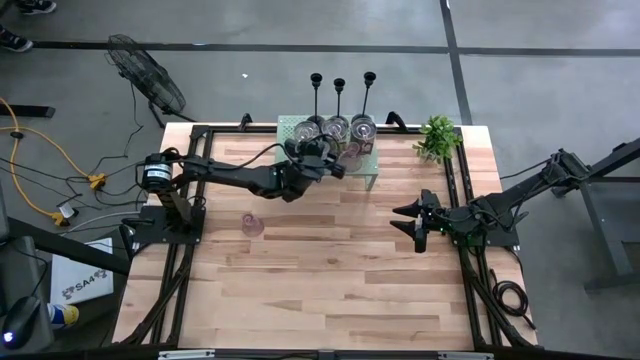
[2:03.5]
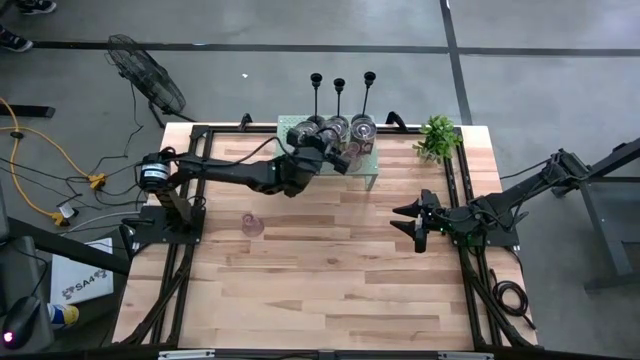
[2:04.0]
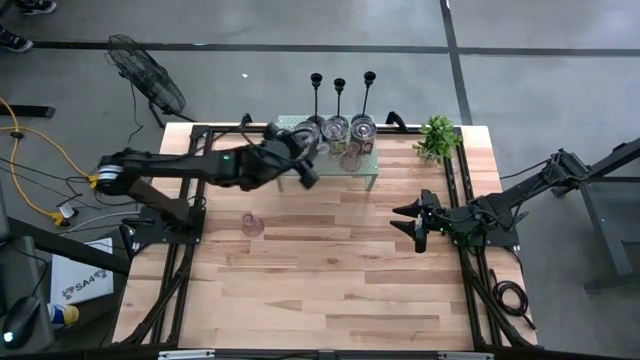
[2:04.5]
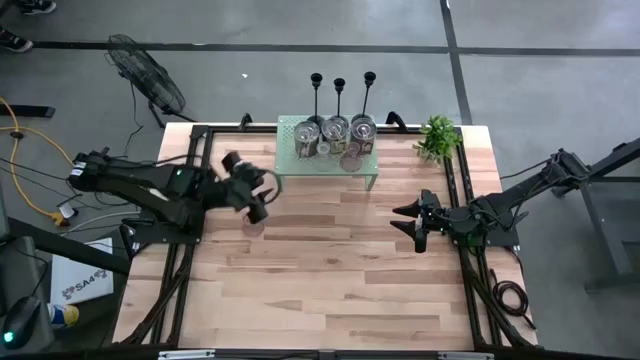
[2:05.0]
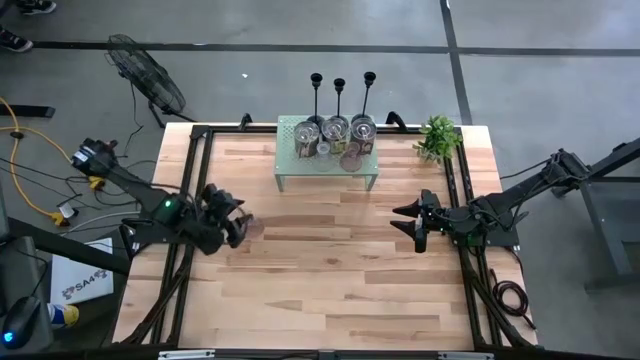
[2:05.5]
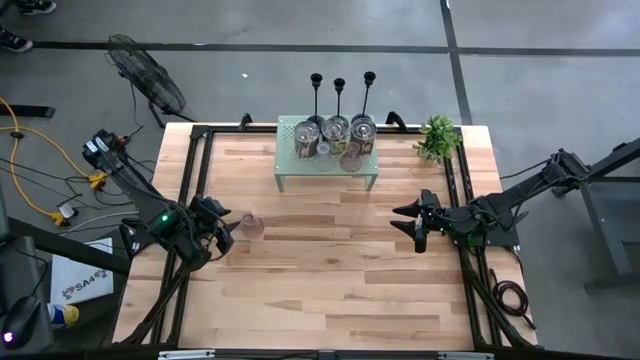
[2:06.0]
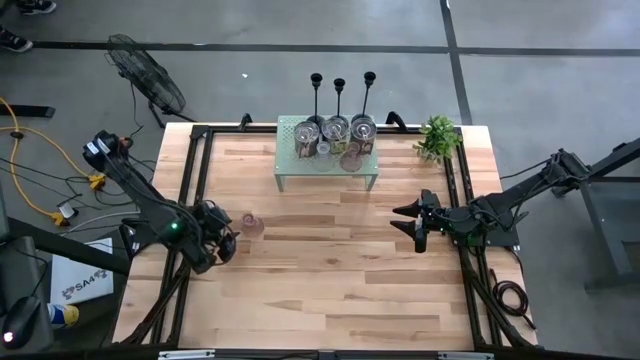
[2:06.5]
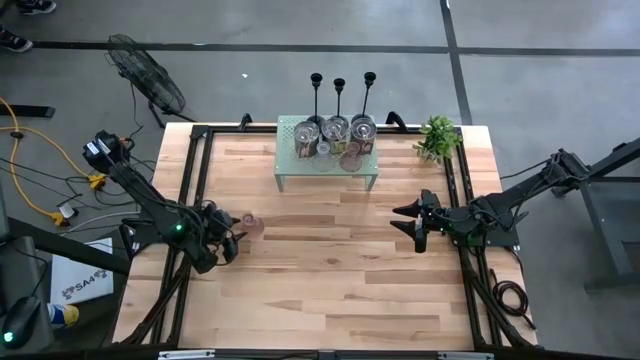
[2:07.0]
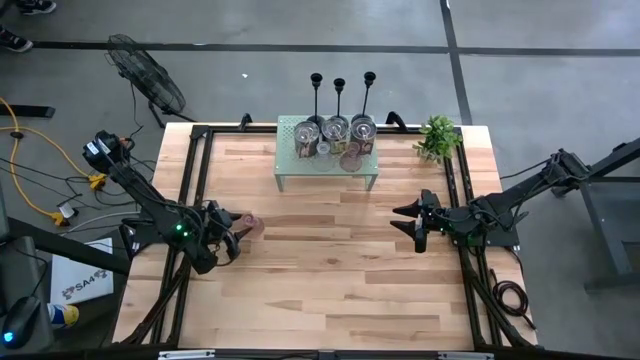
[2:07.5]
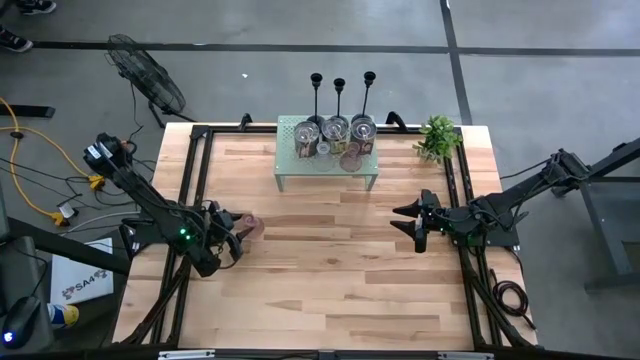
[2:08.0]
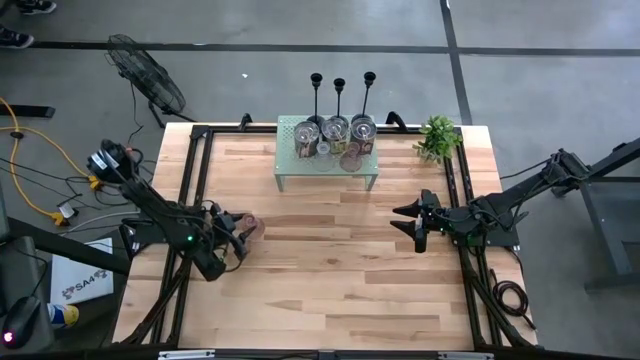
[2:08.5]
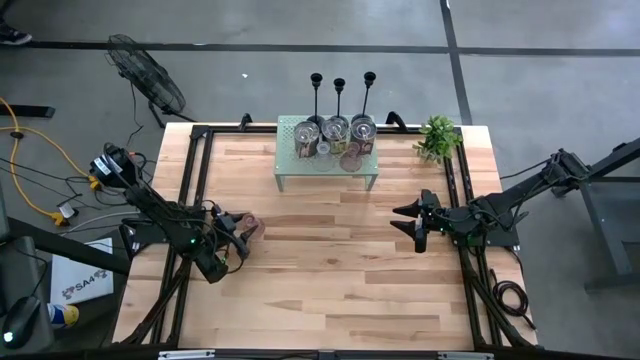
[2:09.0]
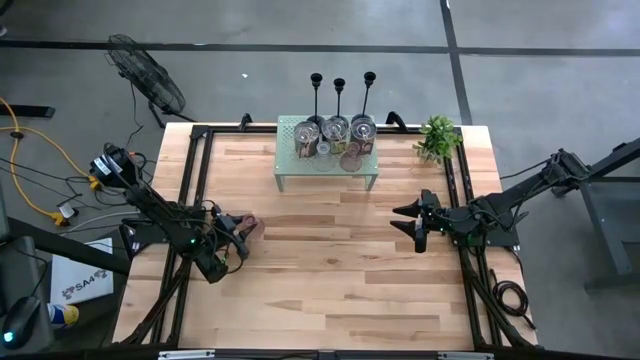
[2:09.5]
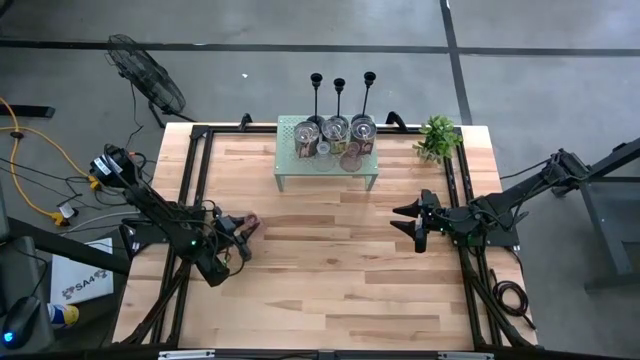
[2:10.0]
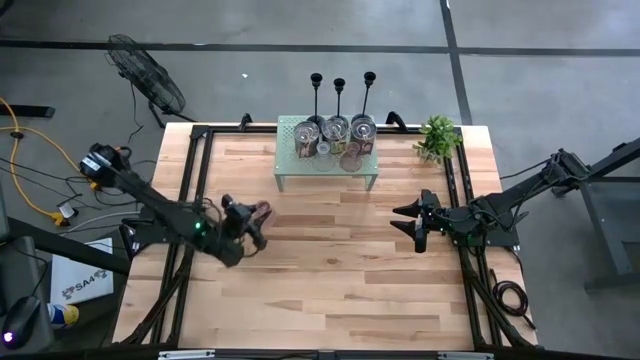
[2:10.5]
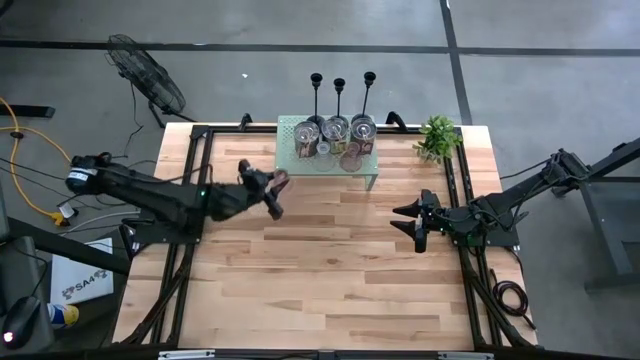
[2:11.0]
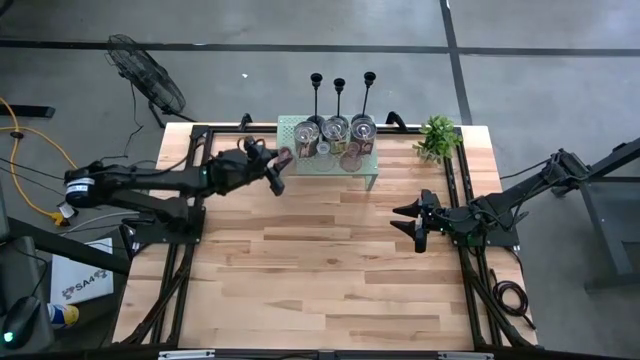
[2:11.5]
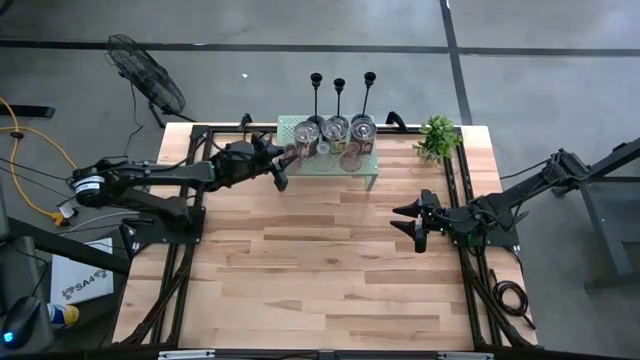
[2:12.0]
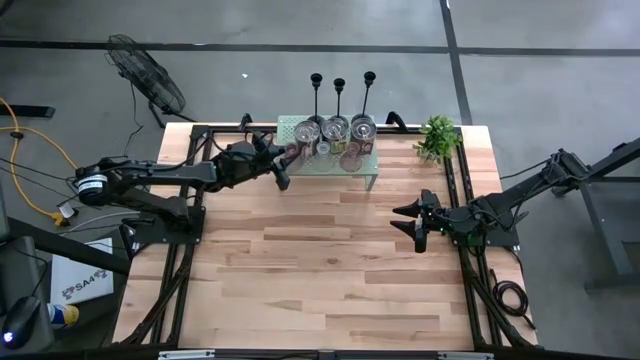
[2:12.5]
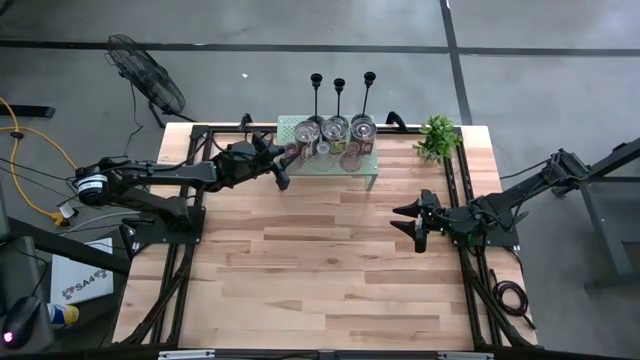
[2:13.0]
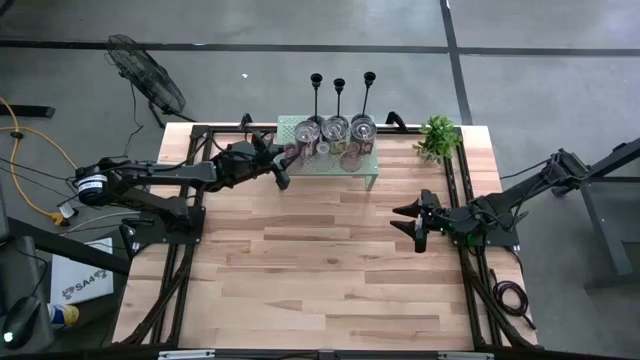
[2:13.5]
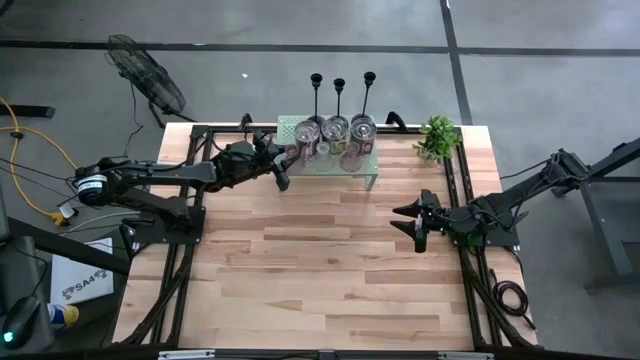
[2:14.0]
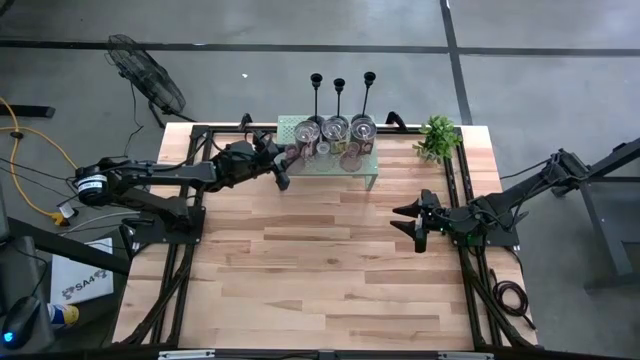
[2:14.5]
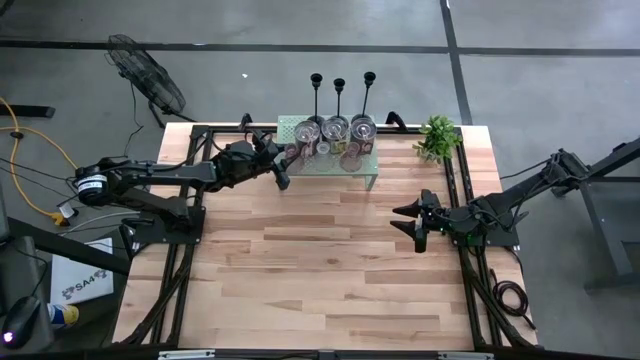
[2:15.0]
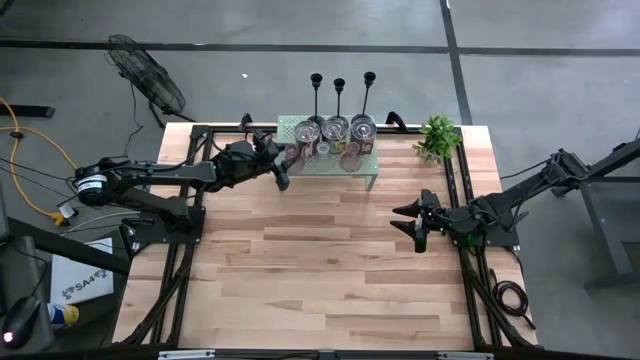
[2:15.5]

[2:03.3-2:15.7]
Task: Pick & Place candle stick holders
Put the pink glass candle holder on the shelf aligned with the transparent glass candle holder

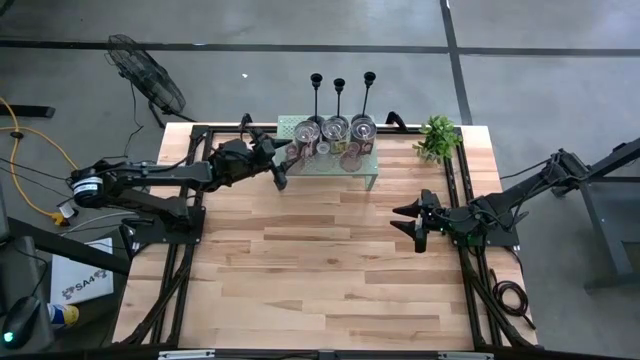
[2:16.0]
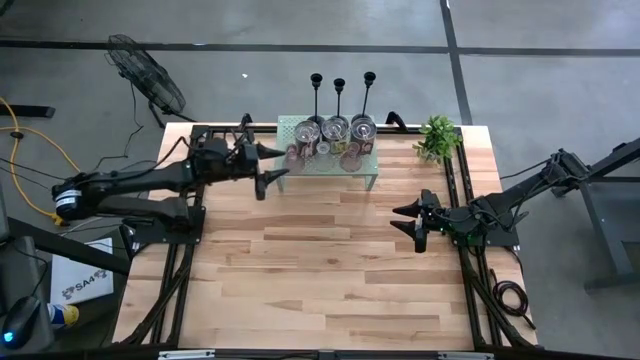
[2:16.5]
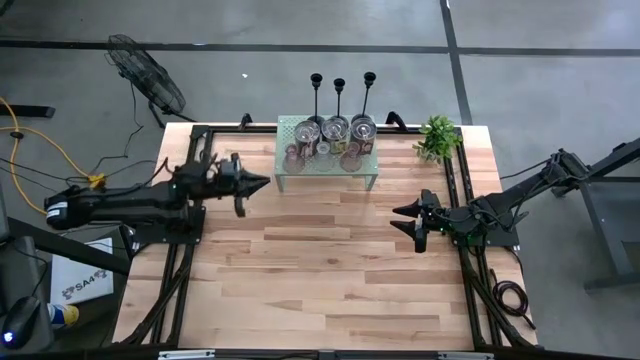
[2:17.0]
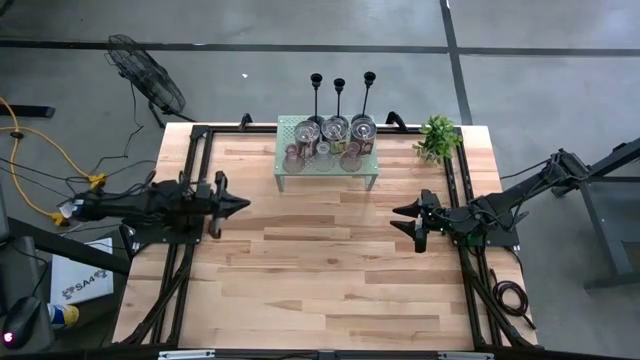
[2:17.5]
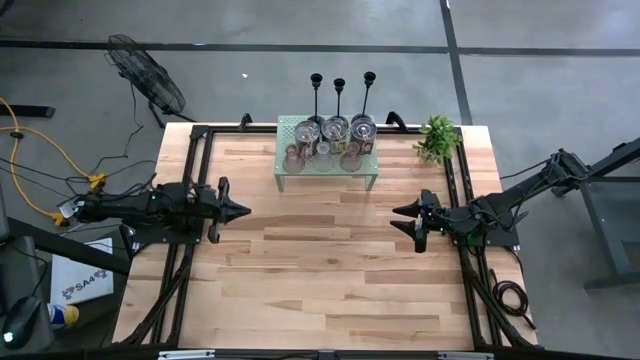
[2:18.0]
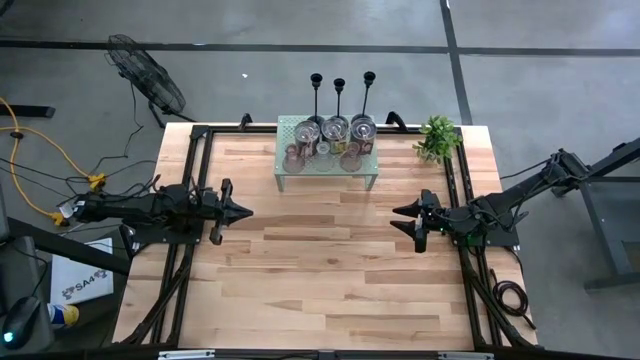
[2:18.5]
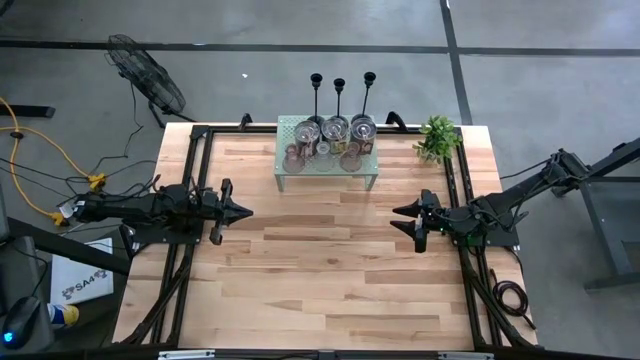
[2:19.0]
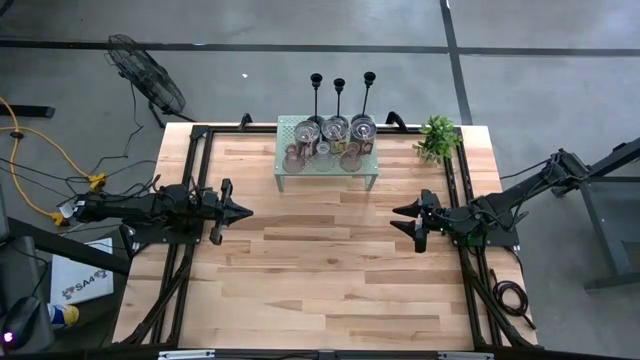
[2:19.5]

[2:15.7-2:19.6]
Return to Home Position

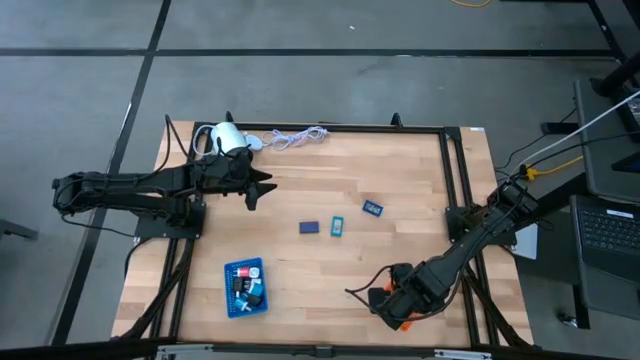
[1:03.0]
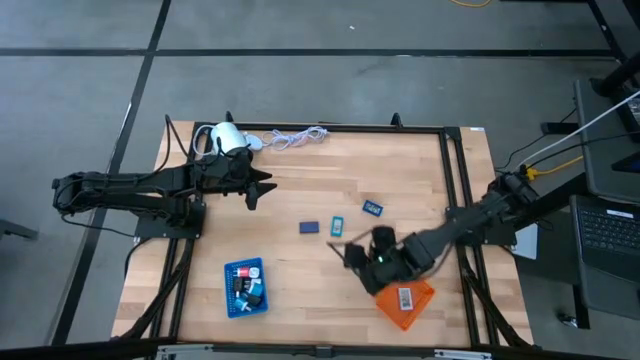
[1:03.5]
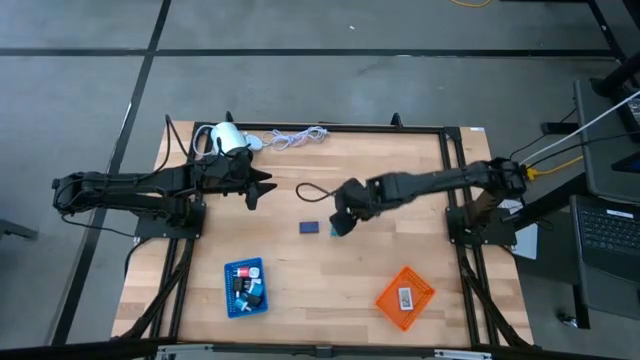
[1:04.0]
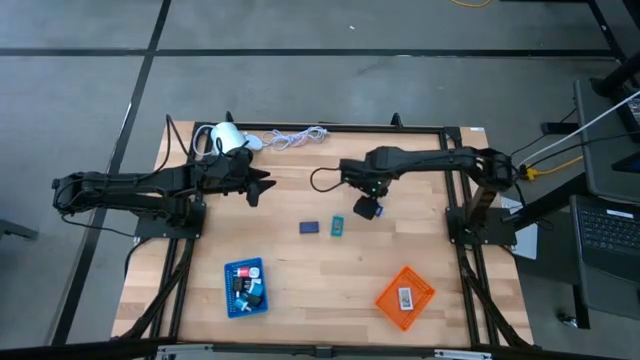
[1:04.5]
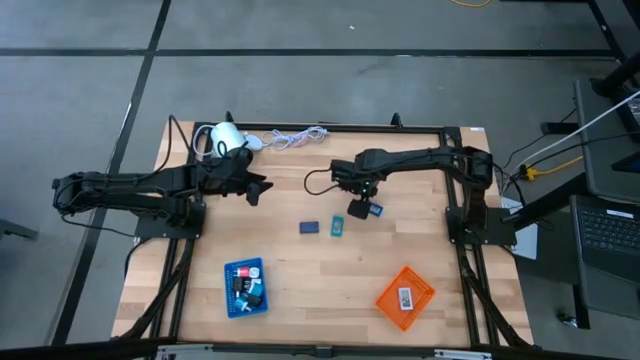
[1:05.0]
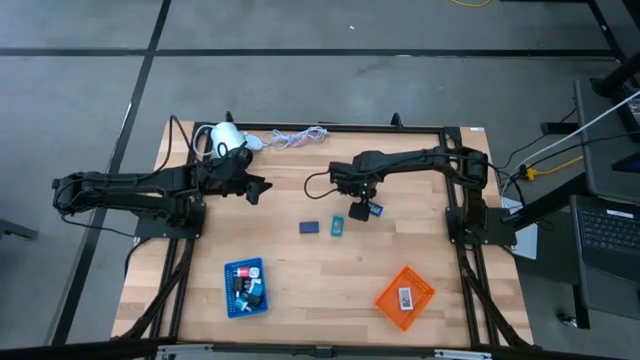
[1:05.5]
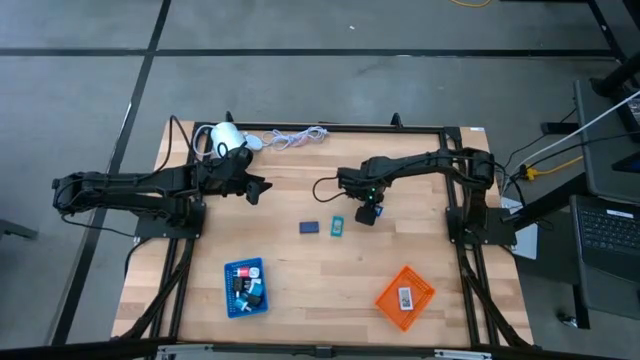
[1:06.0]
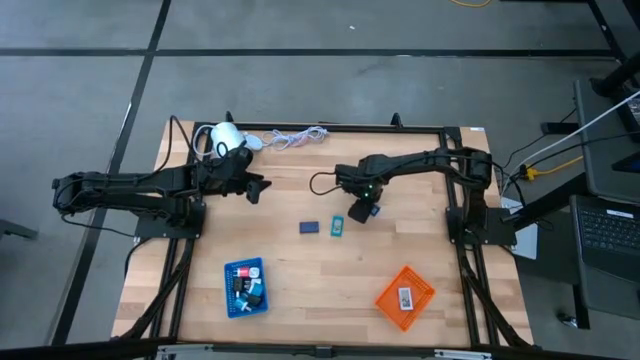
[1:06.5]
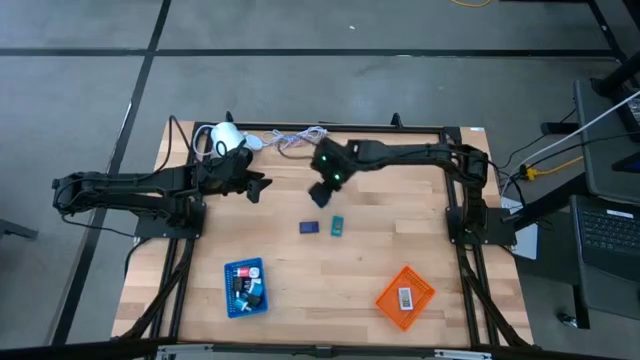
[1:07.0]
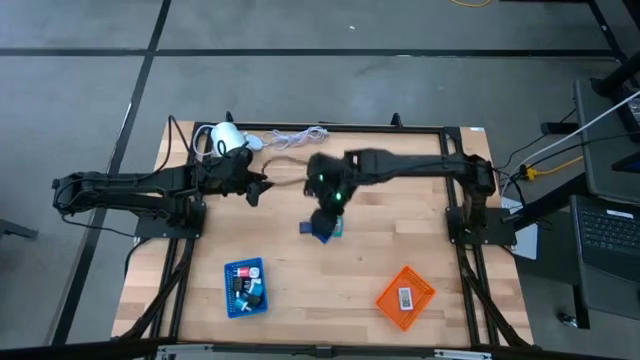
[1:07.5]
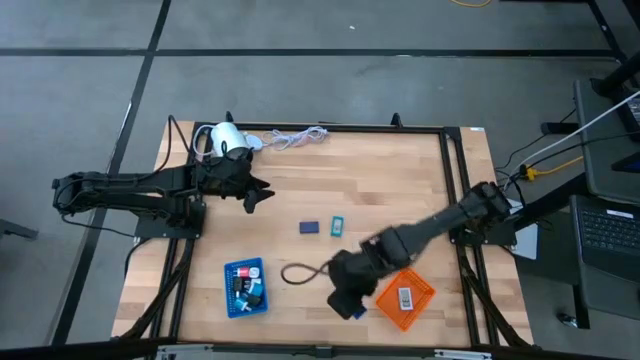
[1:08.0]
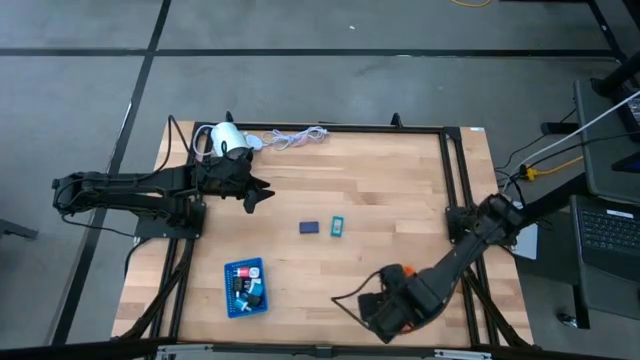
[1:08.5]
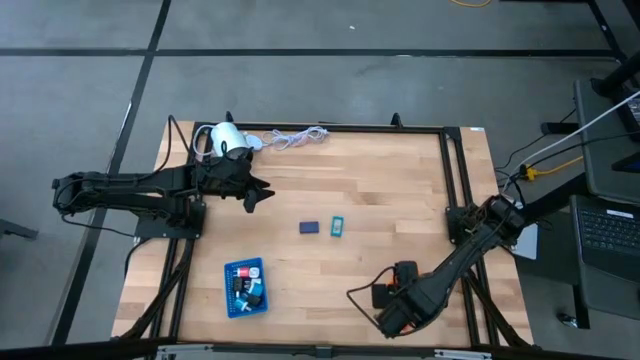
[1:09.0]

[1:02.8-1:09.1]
Task: Pick & Place Office items
Put the right blue digital clock into the orange basket
